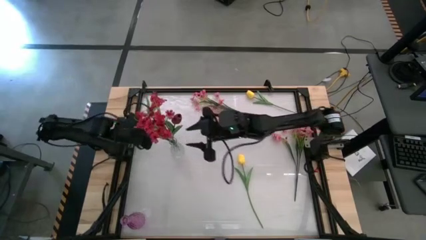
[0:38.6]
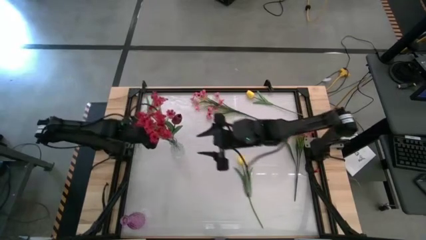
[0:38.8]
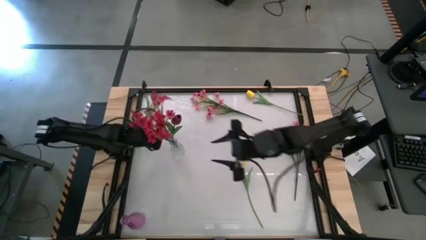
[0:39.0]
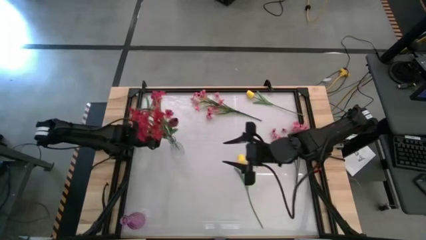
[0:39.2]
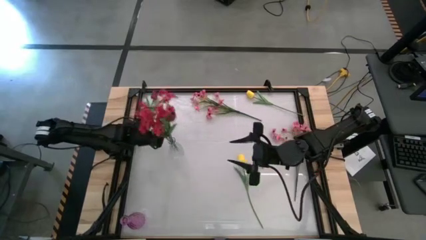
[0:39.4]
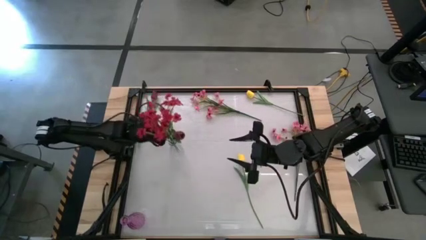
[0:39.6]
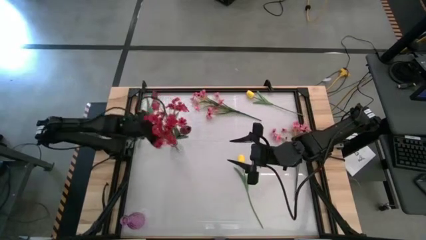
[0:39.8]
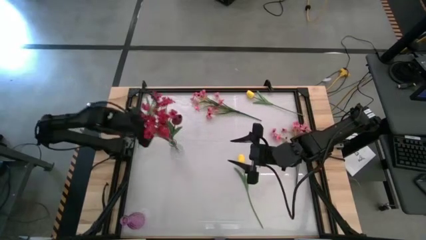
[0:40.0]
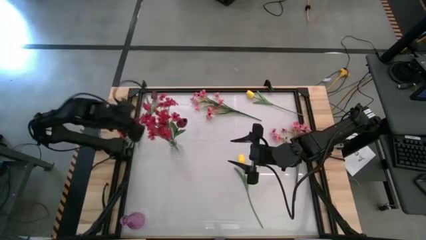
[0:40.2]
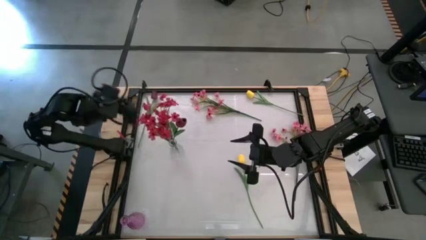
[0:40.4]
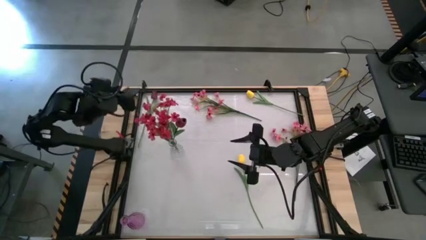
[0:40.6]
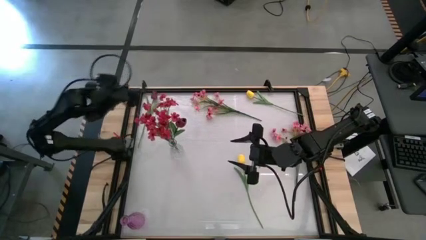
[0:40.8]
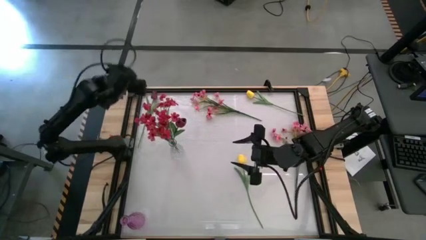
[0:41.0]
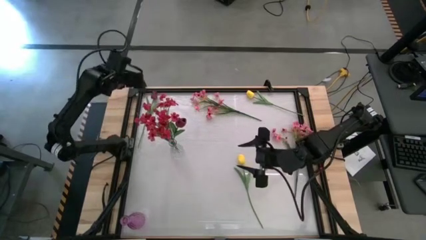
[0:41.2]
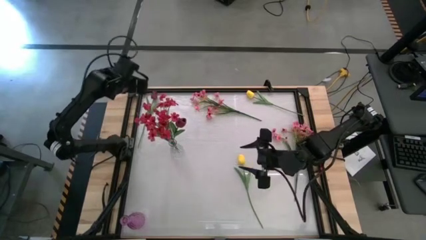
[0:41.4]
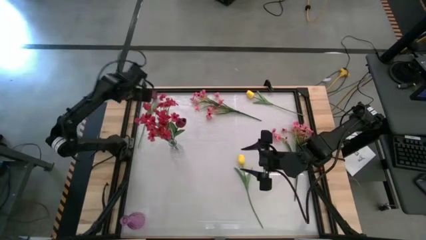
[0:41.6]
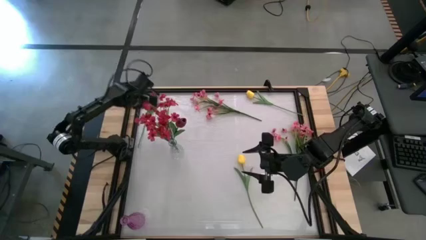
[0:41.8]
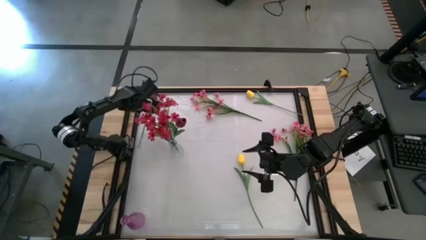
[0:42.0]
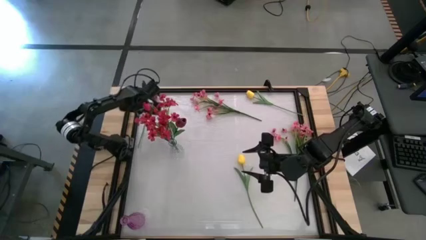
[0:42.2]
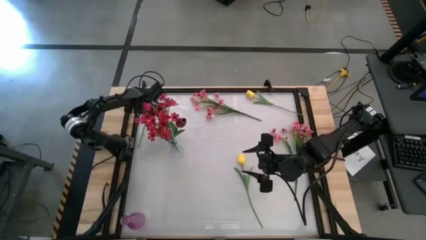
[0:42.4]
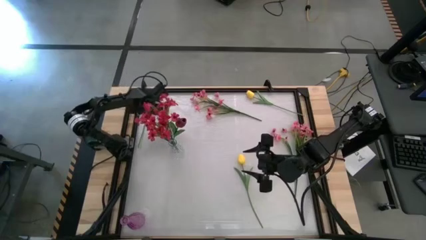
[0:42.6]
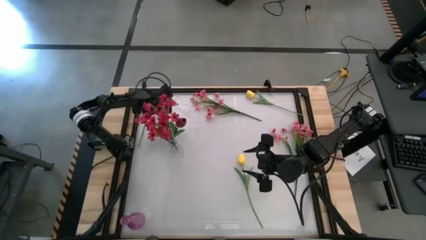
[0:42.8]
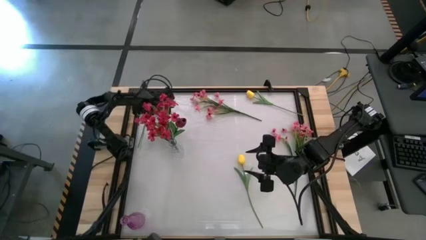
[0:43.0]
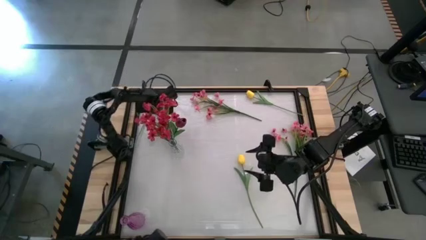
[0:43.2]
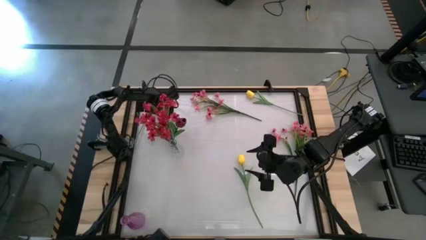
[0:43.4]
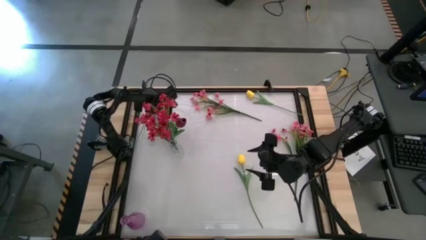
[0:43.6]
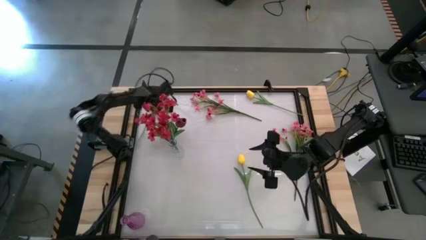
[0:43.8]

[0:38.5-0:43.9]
Task: Sort flowers into vase by color
Put the red flower into the transparent vase

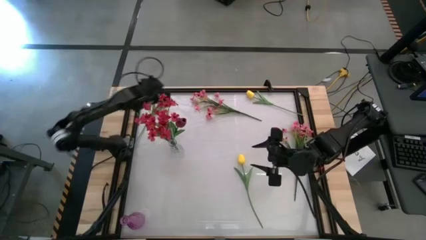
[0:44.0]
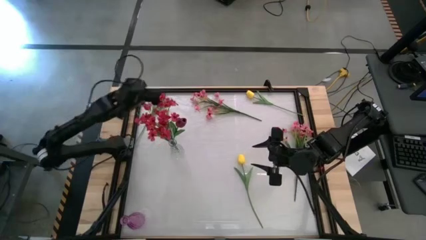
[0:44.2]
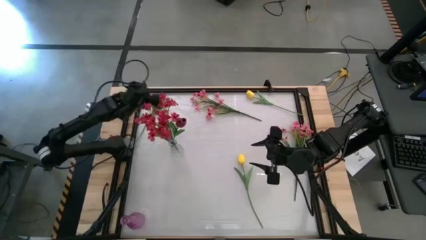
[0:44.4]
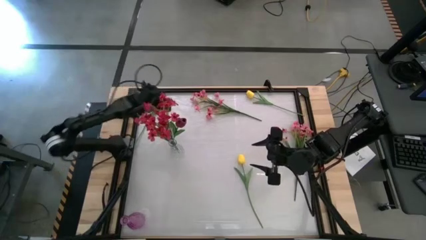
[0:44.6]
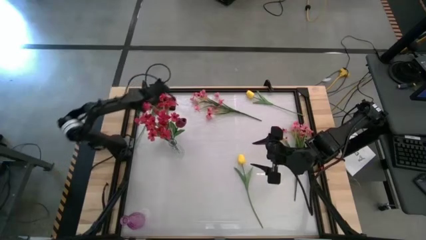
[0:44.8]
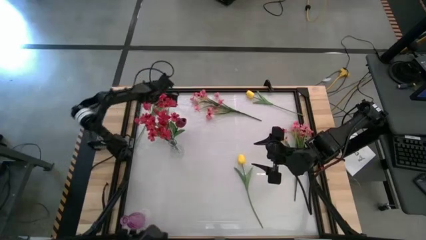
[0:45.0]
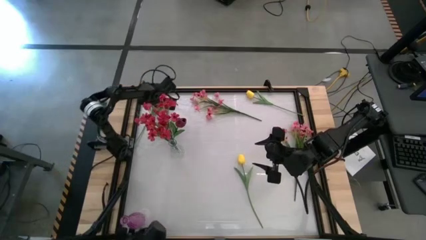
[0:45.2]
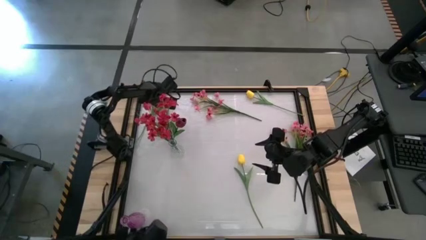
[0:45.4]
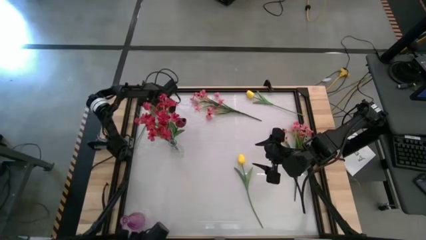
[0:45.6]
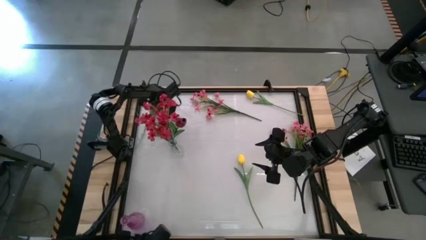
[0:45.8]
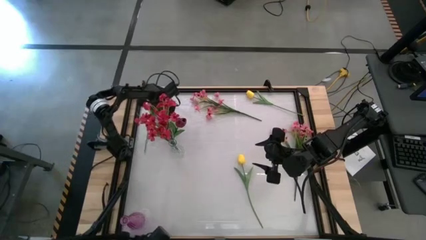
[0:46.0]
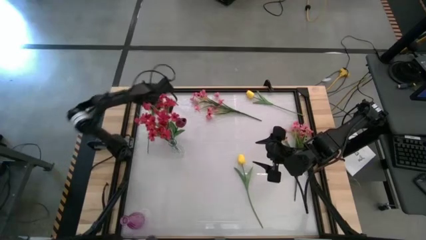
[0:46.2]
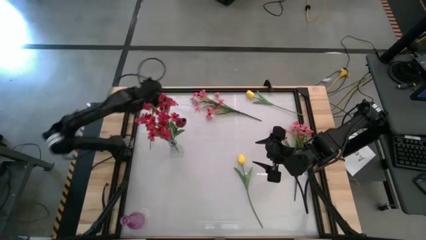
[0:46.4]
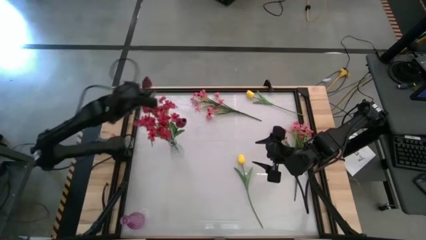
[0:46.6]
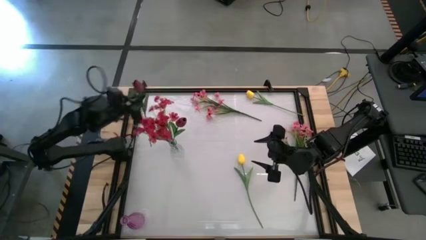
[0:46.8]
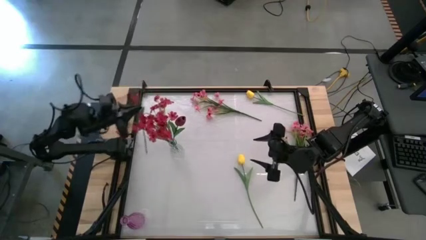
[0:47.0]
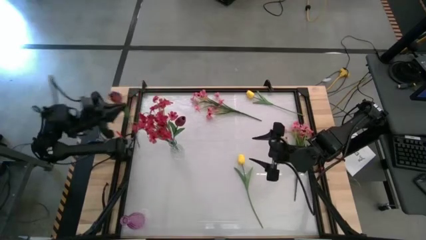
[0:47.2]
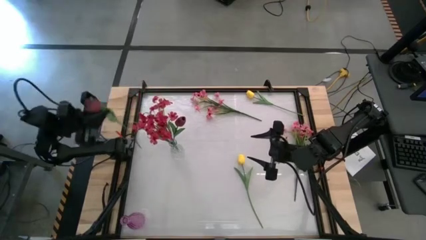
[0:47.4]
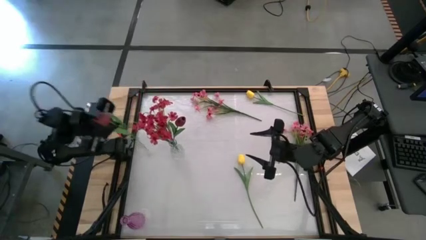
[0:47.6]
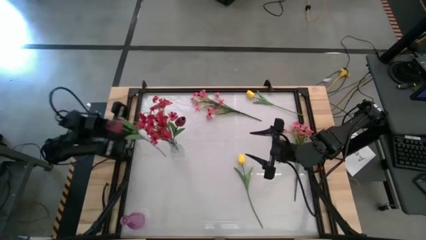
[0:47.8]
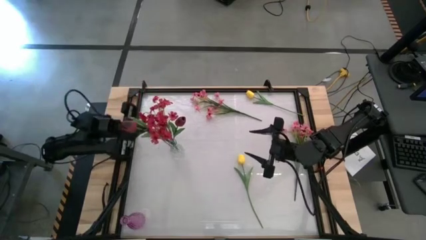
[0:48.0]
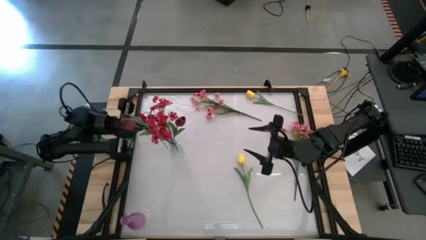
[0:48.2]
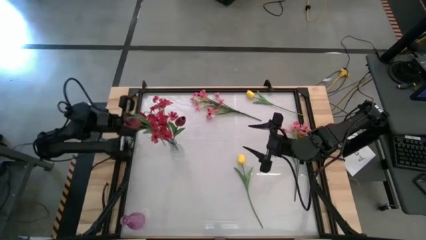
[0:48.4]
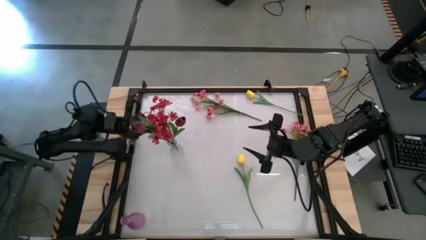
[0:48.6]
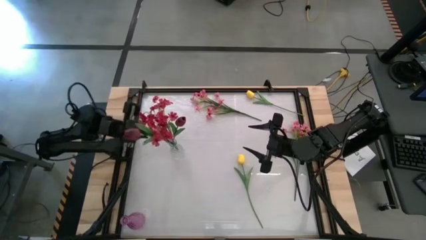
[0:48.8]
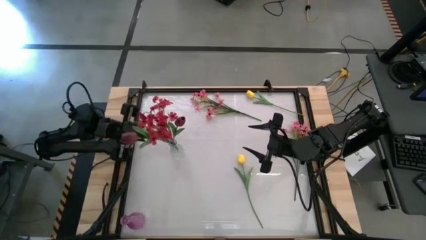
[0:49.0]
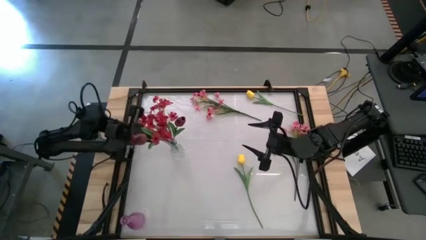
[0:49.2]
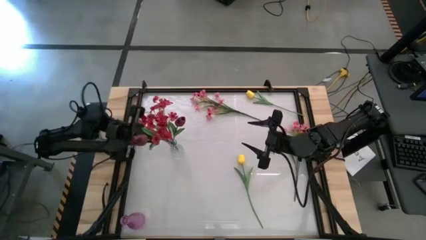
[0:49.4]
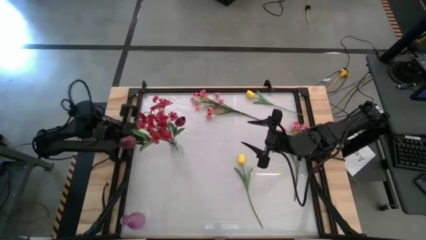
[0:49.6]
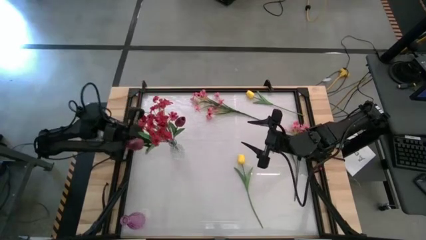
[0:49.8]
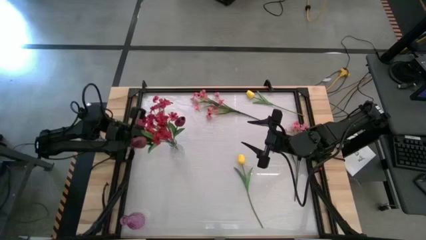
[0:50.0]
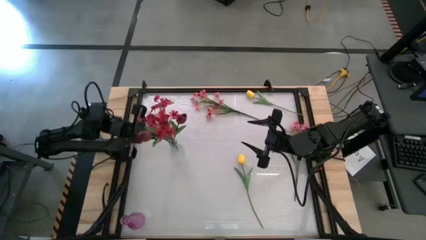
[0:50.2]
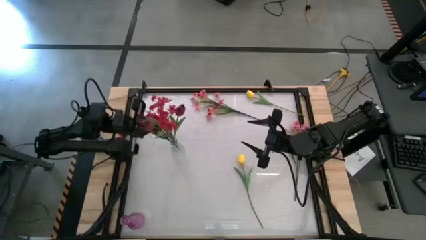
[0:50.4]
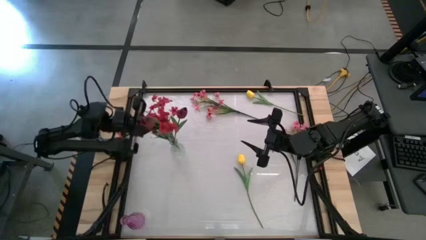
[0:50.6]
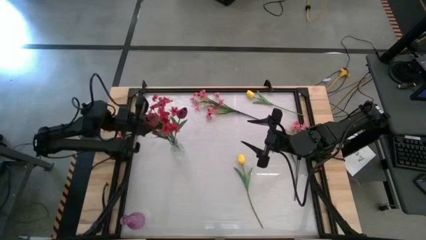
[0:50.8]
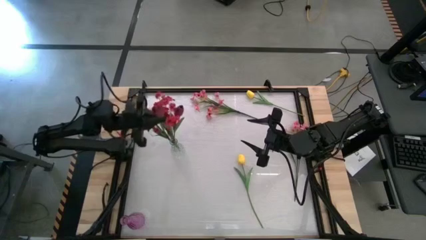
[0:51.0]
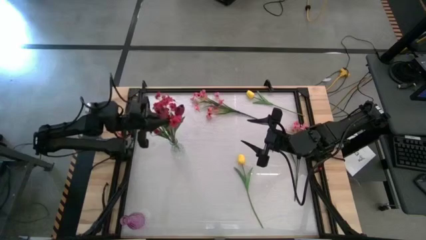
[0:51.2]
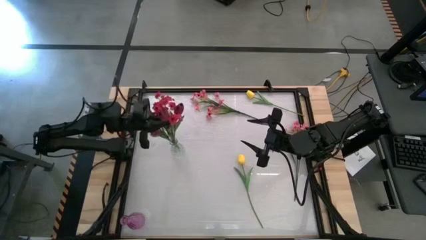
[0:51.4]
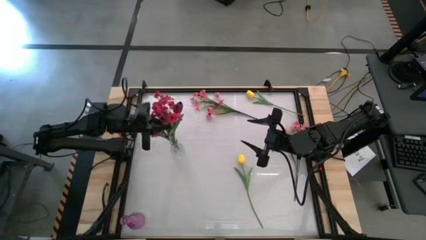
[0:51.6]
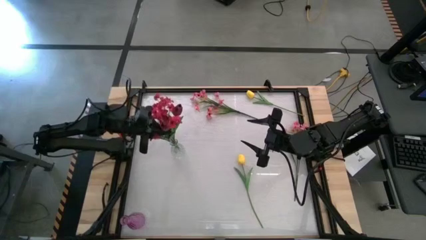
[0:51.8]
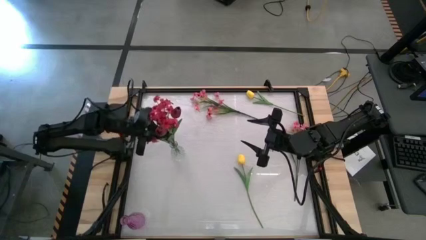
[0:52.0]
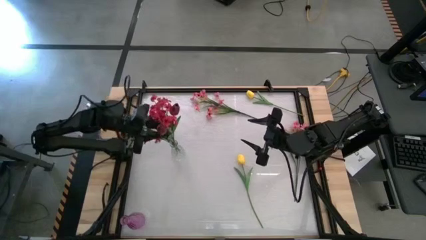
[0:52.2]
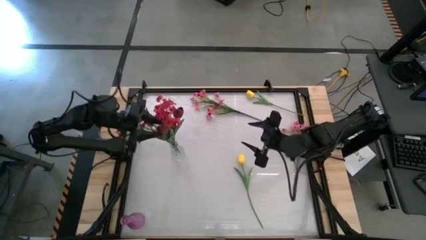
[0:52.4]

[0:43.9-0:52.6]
Put the red flower into the transparent vase

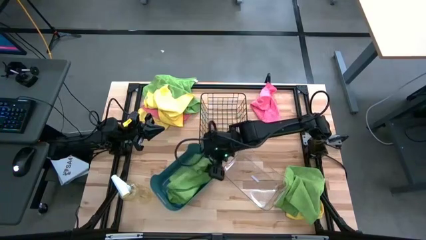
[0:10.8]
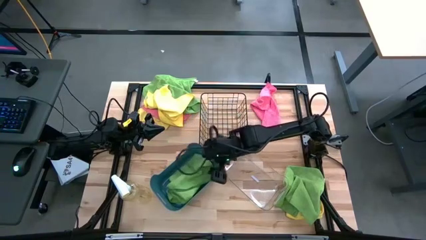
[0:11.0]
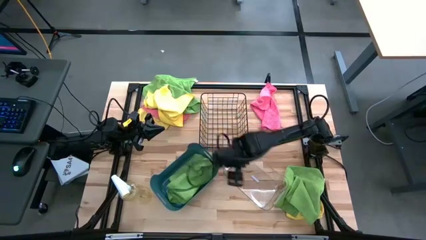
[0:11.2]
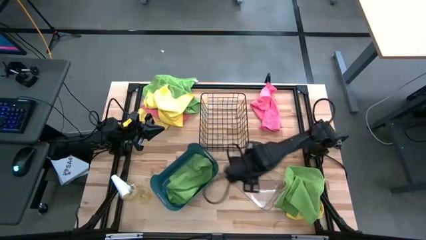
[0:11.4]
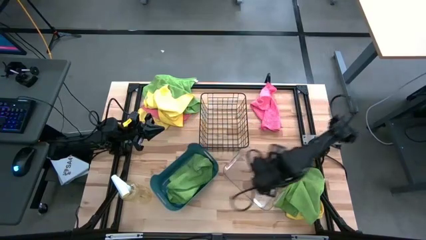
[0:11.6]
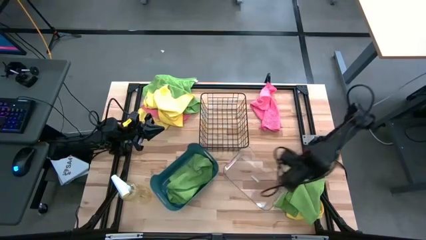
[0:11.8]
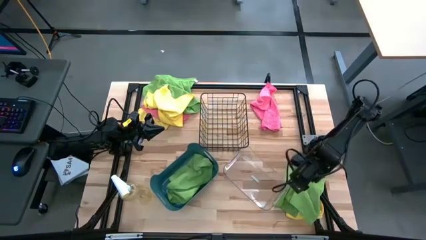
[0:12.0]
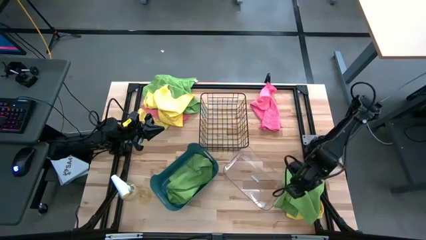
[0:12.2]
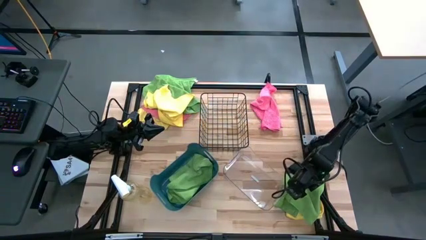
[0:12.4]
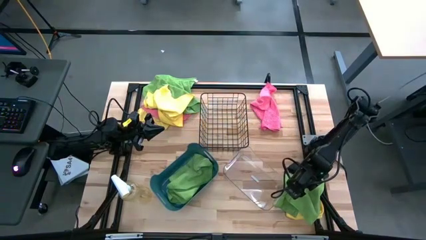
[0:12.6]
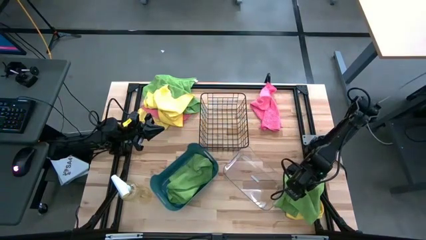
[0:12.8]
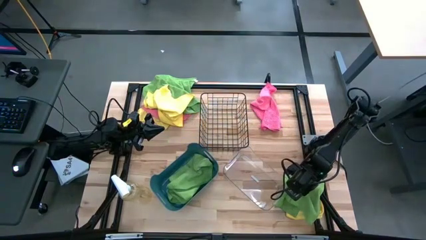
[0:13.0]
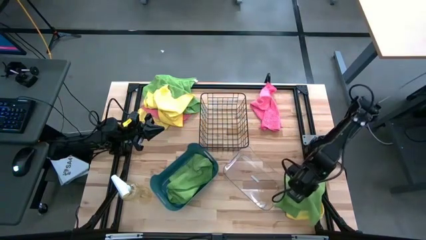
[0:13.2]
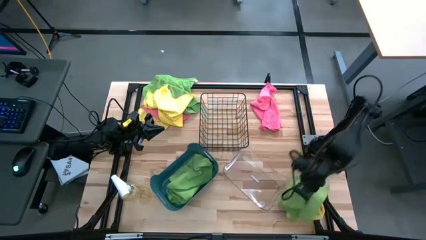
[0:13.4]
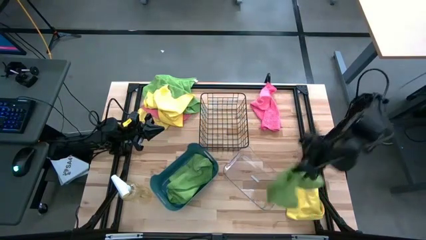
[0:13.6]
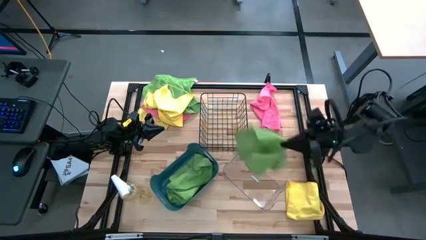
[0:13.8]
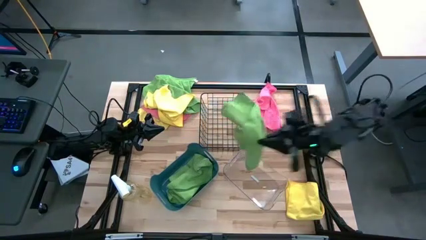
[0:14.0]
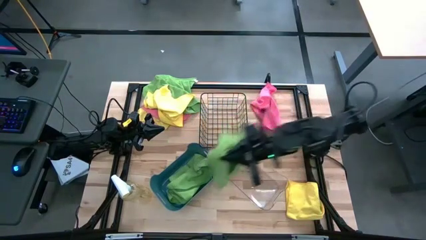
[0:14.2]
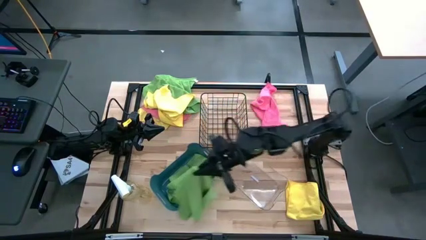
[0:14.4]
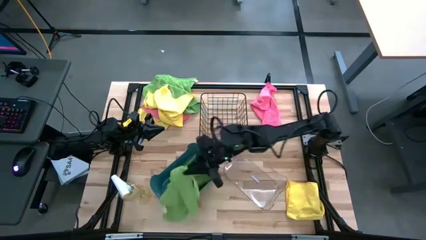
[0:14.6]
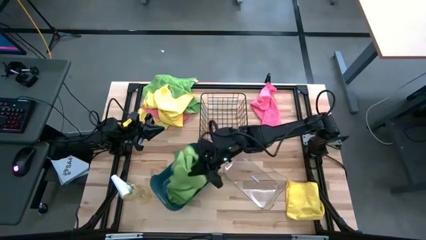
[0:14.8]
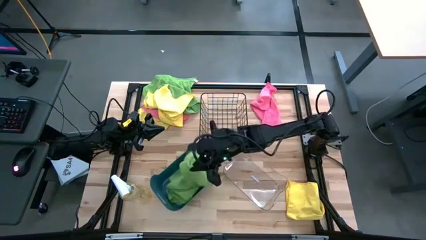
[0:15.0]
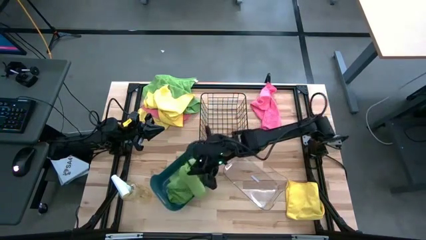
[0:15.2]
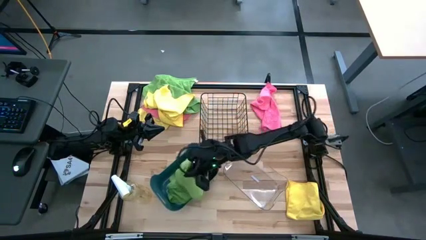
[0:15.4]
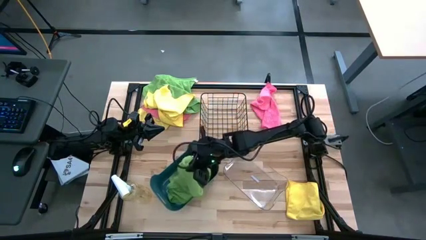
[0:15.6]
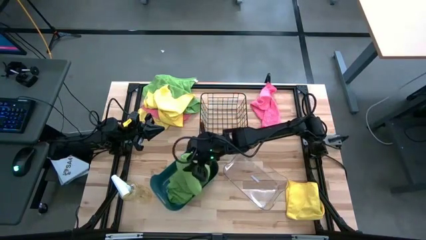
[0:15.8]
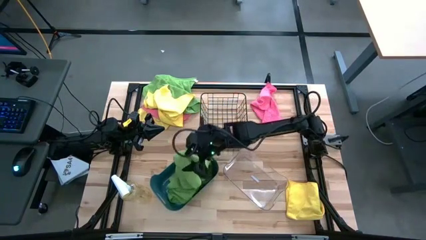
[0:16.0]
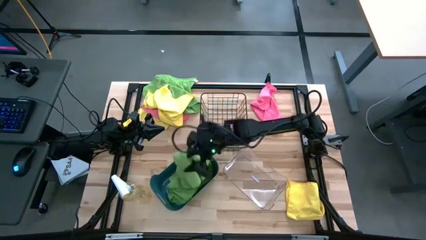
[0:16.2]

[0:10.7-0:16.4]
Task: Sort microfiber towel by color & place in baskets
Put the bottom green towel into the blue bin
